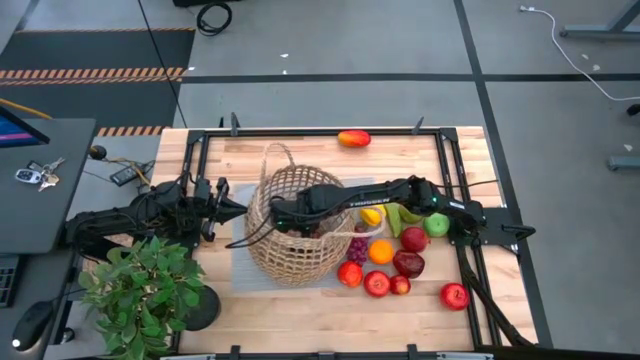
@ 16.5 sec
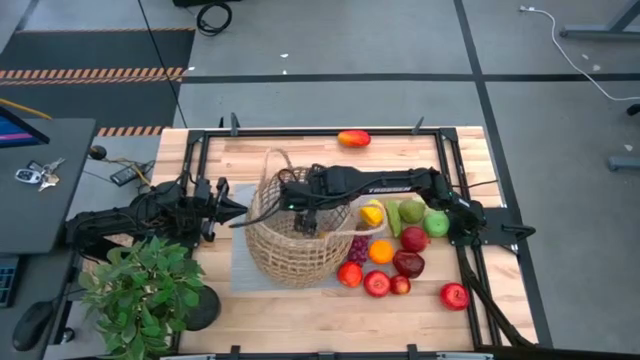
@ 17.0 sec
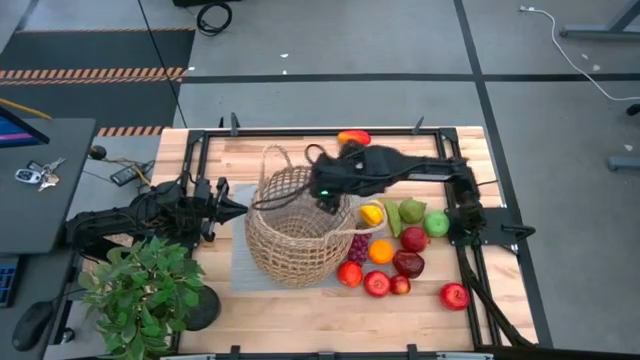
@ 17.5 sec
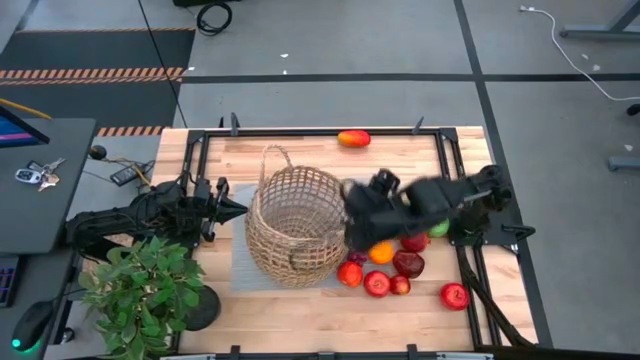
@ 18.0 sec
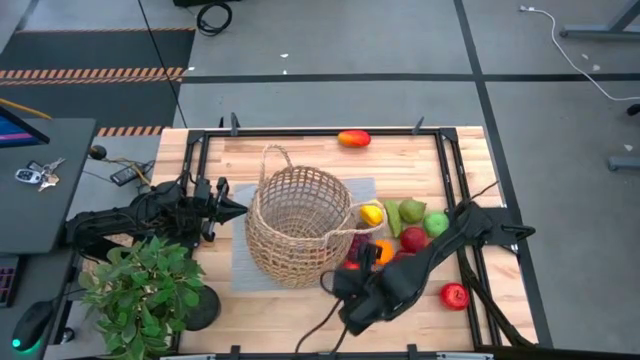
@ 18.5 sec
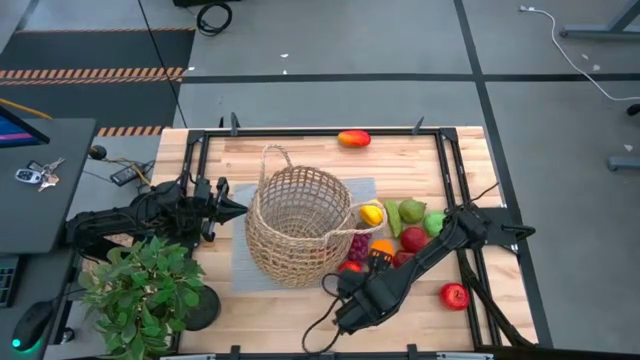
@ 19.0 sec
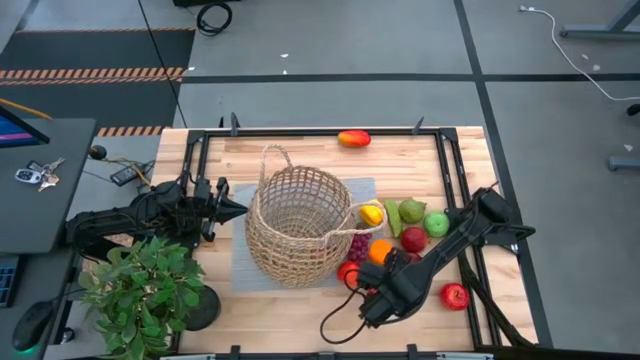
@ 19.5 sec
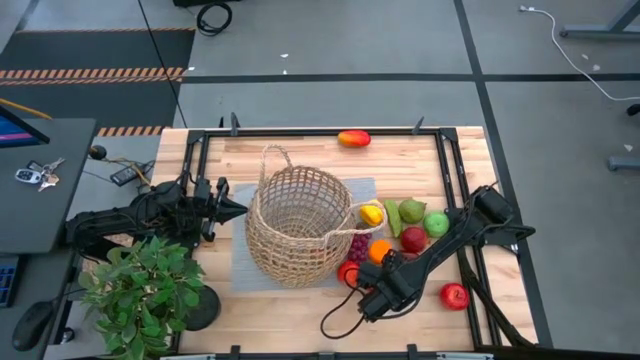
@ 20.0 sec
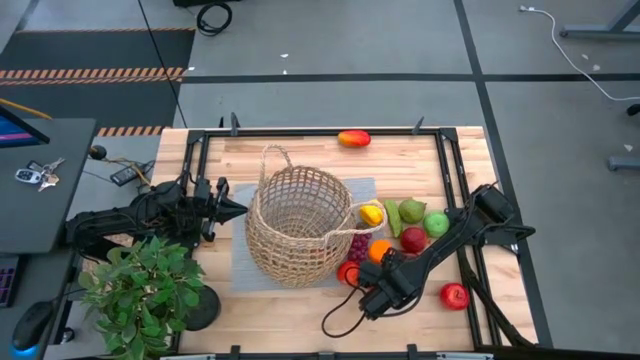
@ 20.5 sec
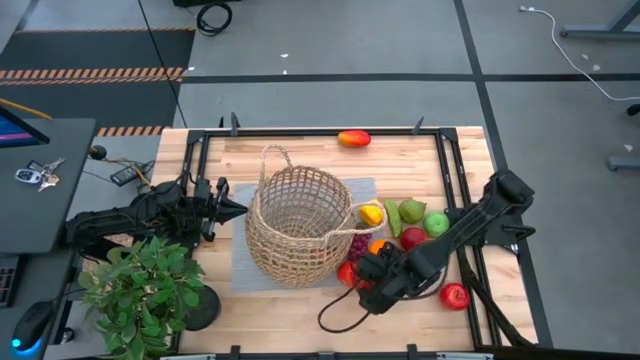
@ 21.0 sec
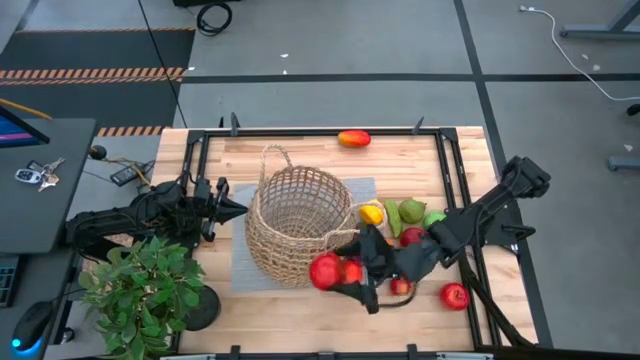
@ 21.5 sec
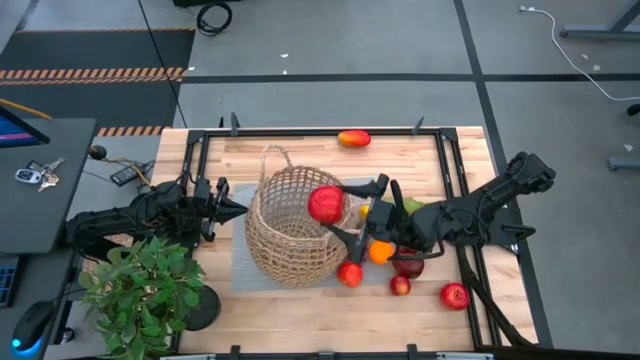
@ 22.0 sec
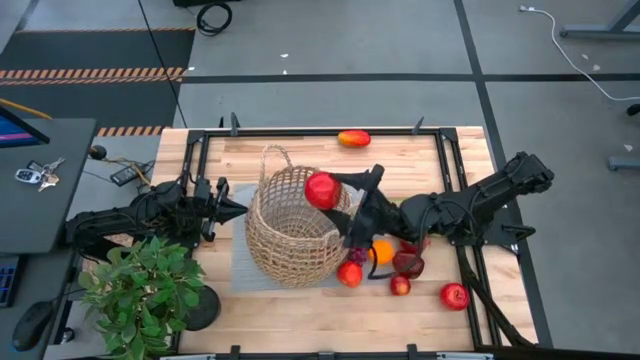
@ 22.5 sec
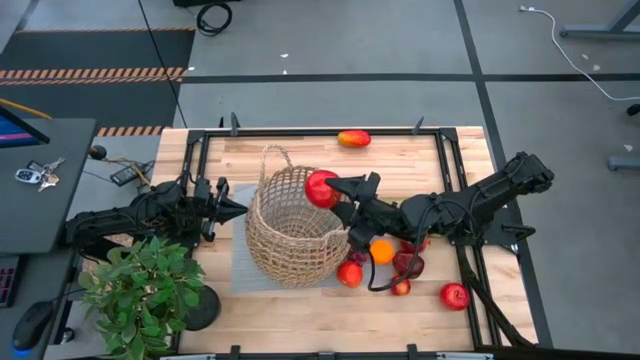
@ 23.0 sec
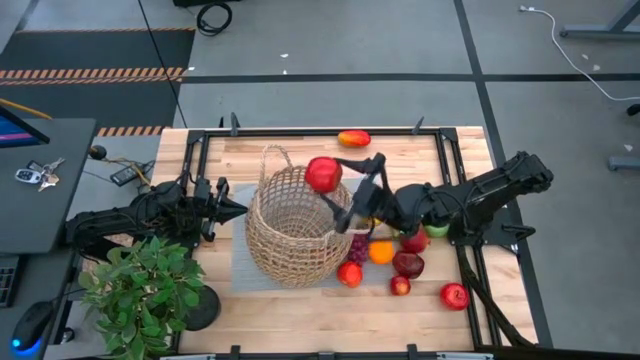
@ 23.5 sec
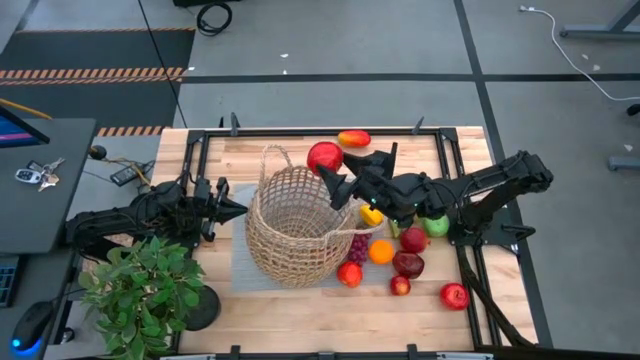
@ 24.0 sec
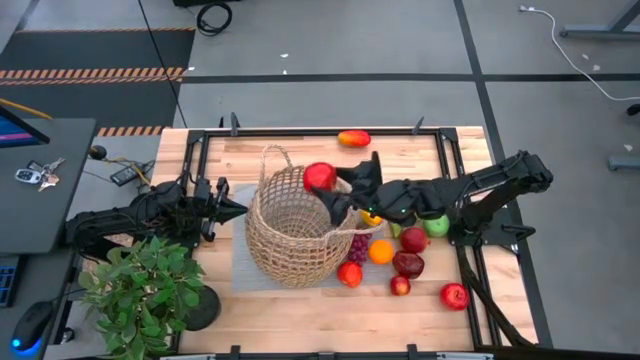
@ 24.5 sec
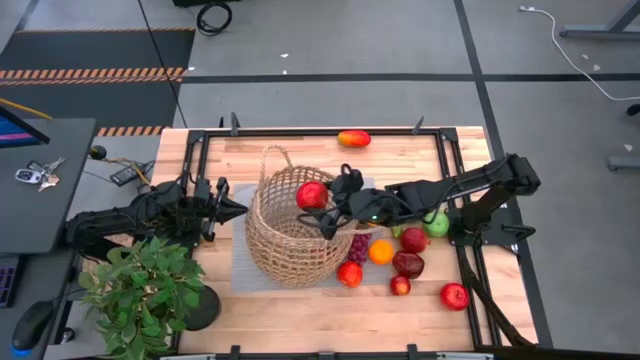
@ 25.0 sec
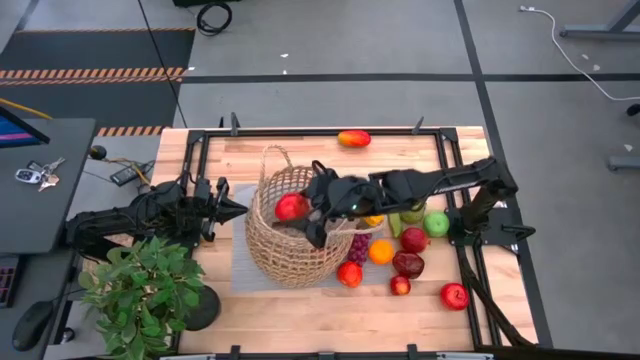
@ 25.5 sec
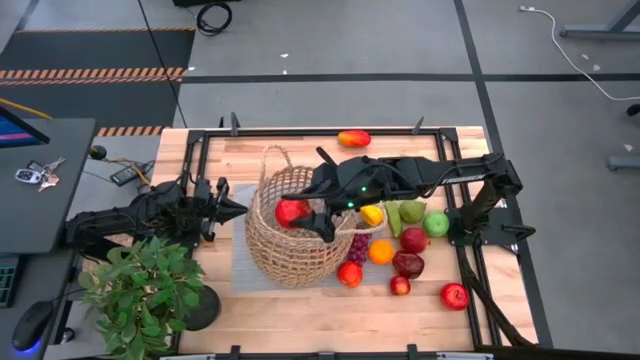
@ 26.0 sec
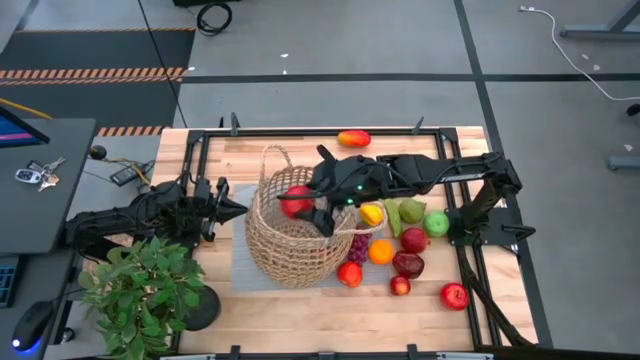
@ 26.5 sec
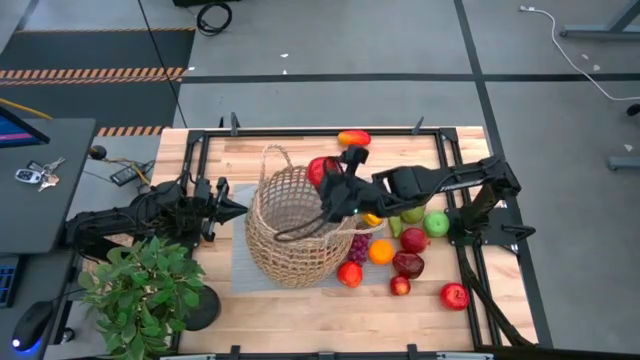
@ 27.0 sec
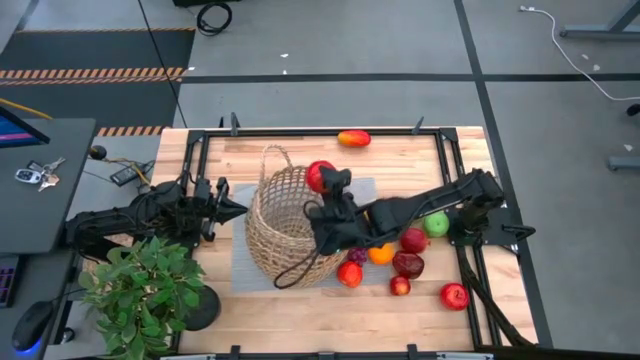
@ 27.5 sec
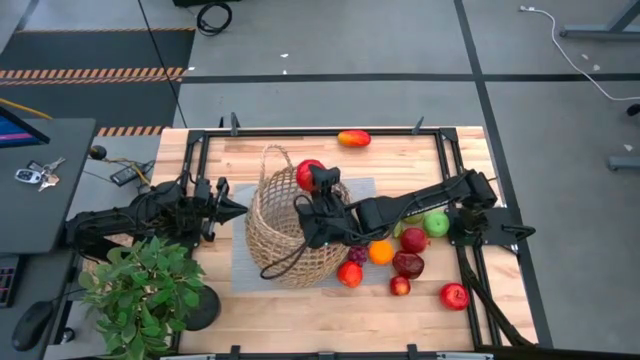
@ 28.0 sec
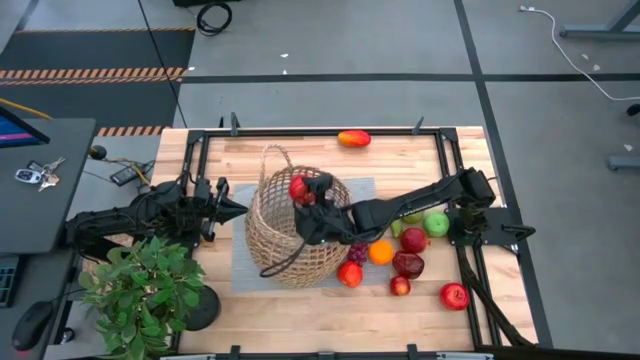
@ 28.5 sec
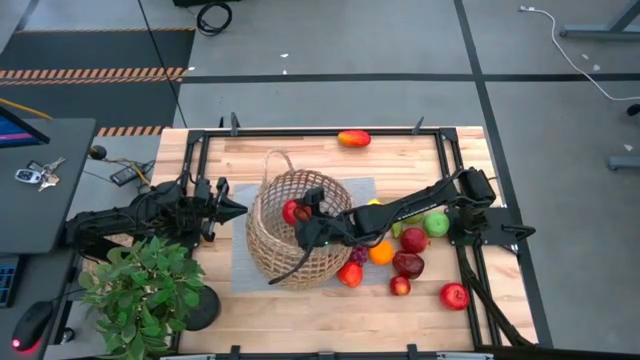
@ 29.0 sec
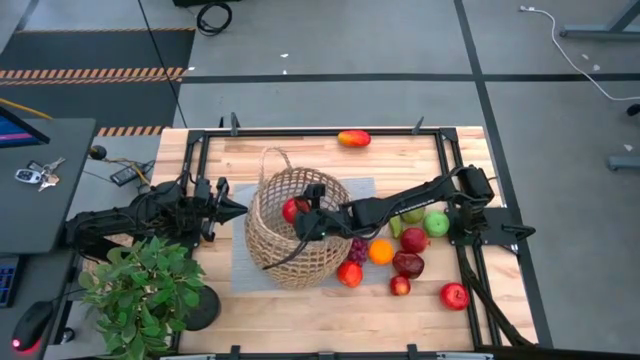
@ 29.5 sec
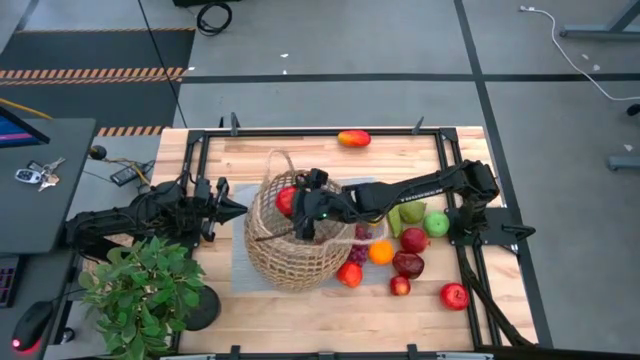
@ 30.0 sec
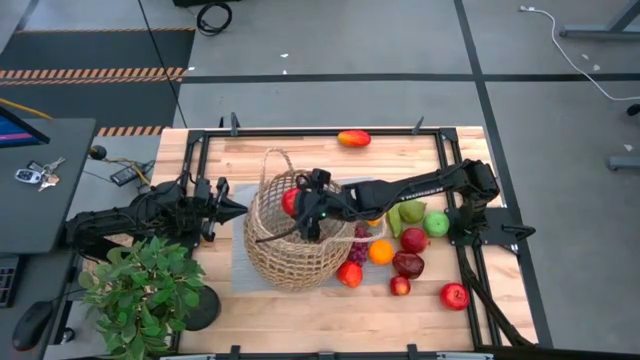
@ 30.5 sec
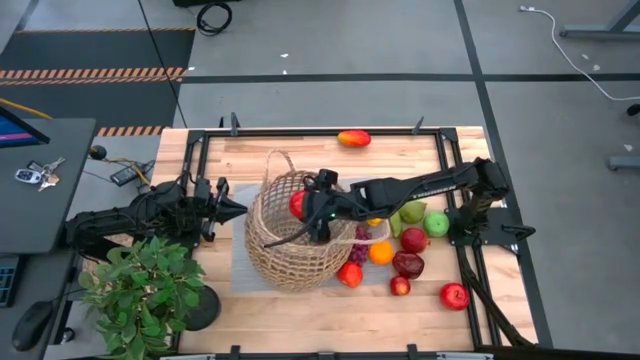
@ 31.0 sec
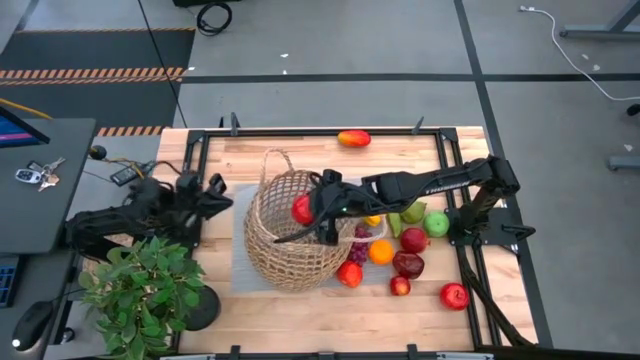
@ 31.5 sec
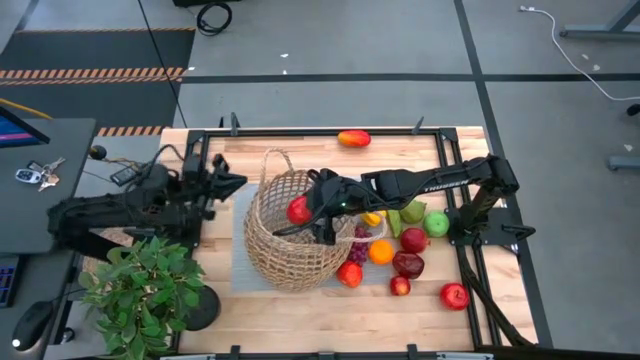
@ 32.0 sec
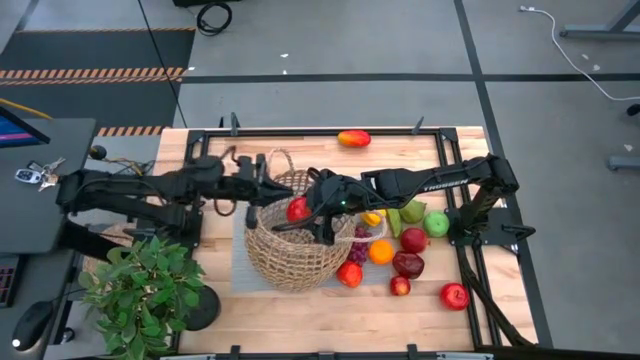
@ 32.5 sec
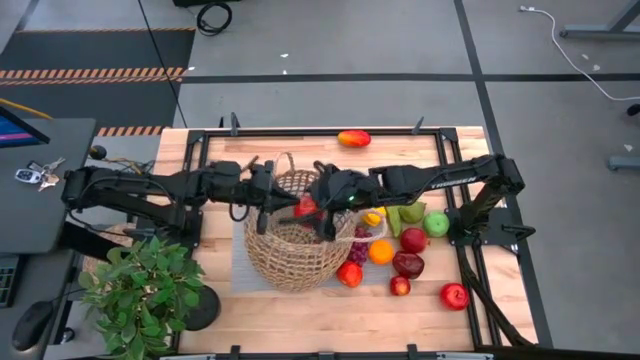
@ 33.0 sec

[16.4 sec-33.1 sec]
Task: Build produce basket
Put the red apple into the basket
